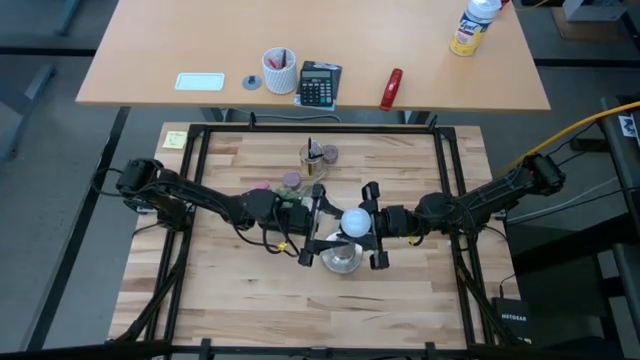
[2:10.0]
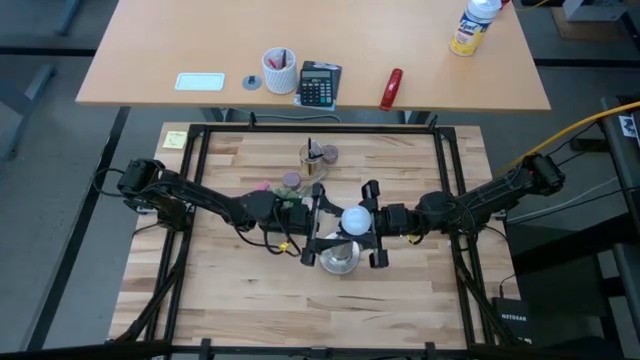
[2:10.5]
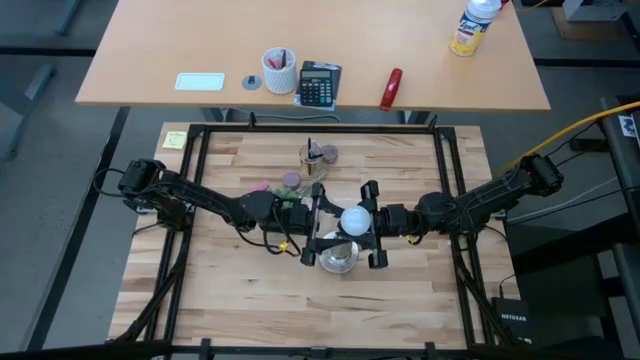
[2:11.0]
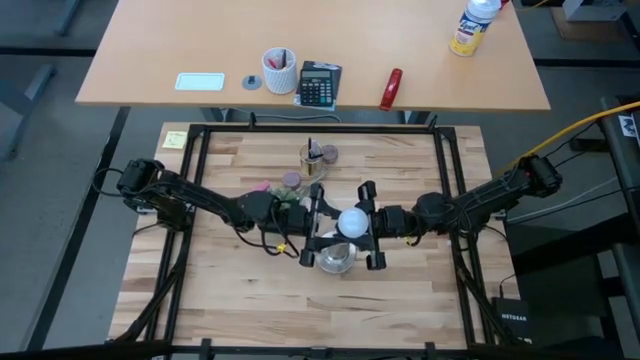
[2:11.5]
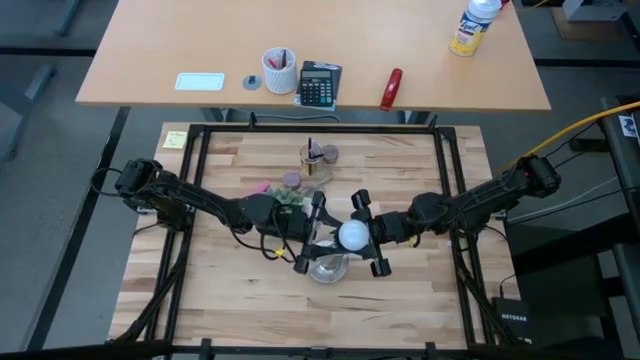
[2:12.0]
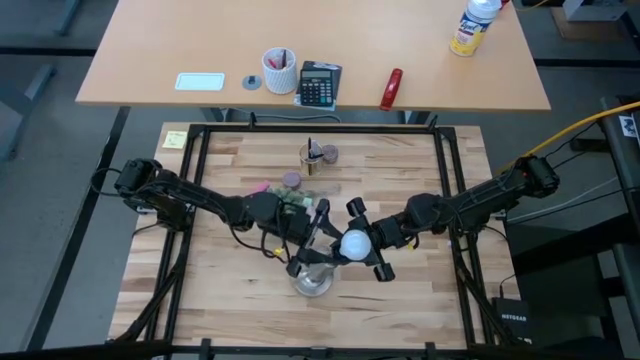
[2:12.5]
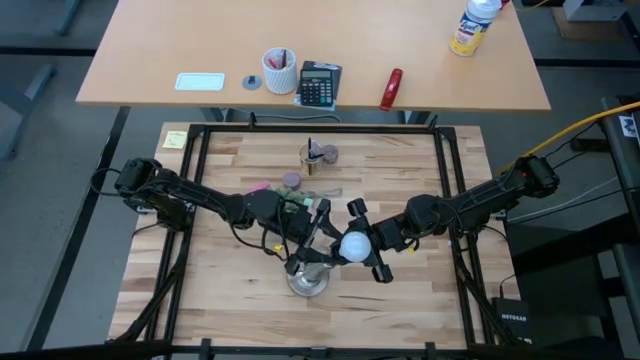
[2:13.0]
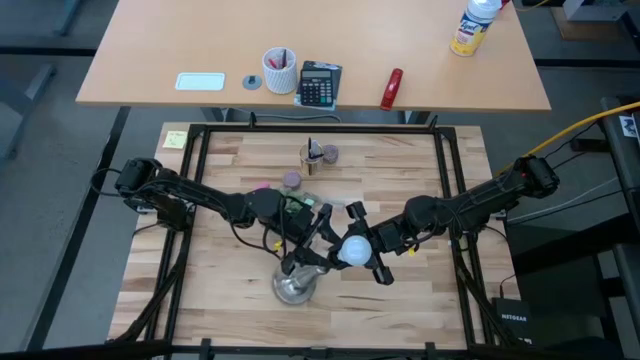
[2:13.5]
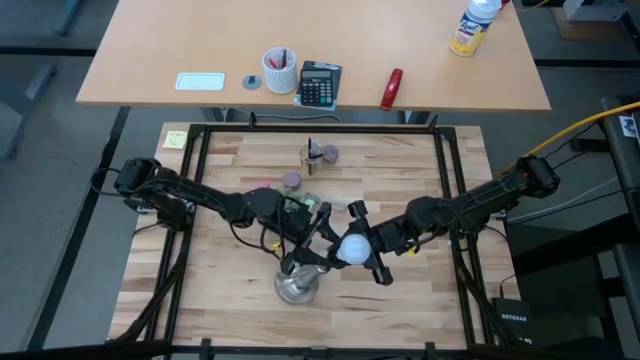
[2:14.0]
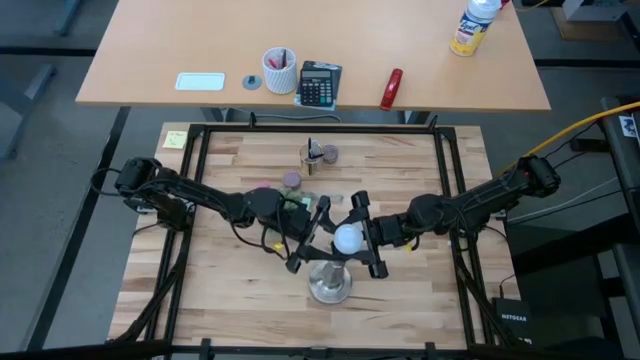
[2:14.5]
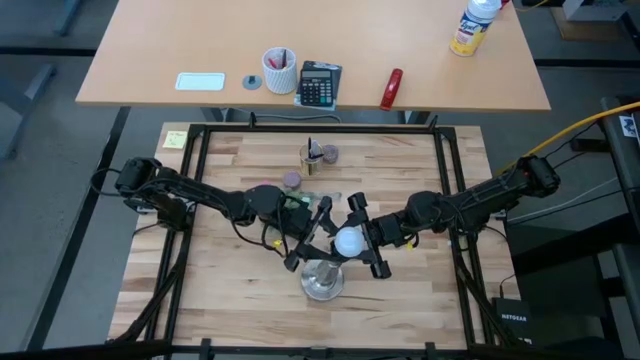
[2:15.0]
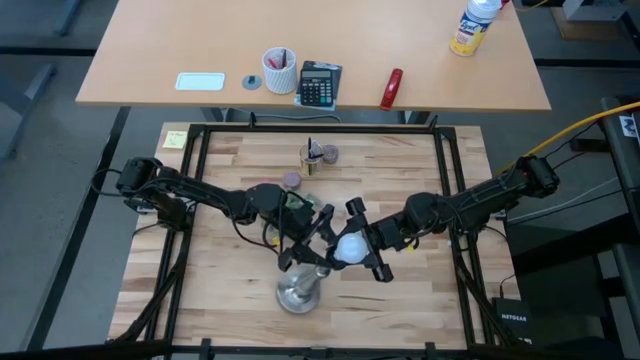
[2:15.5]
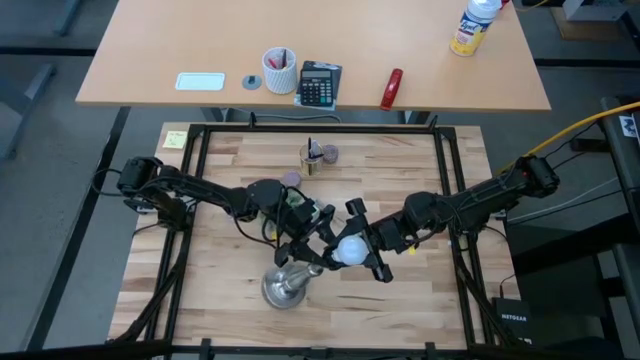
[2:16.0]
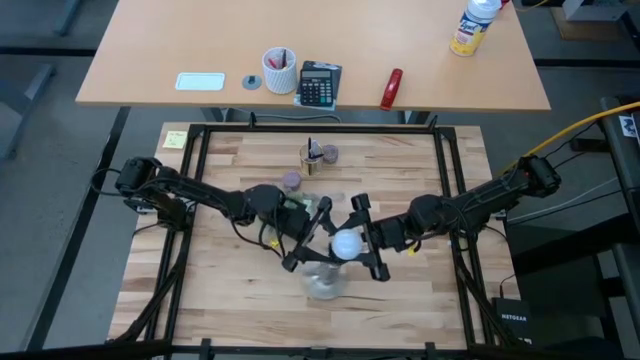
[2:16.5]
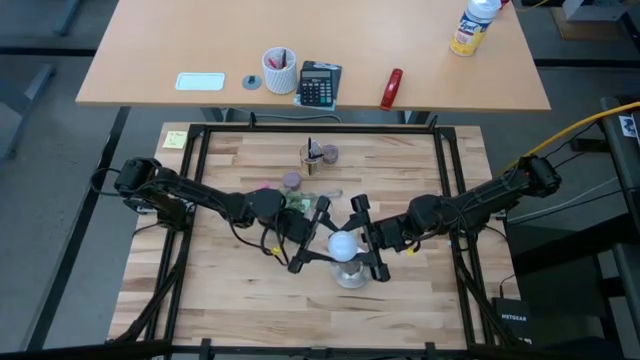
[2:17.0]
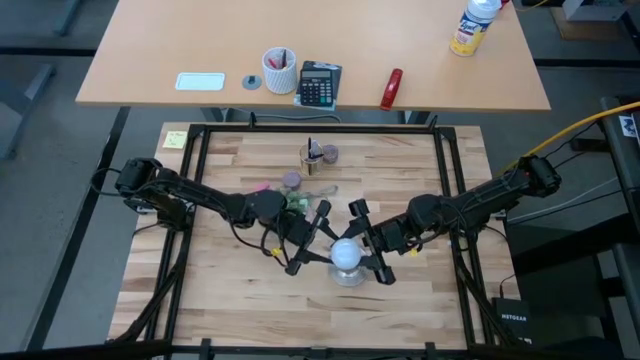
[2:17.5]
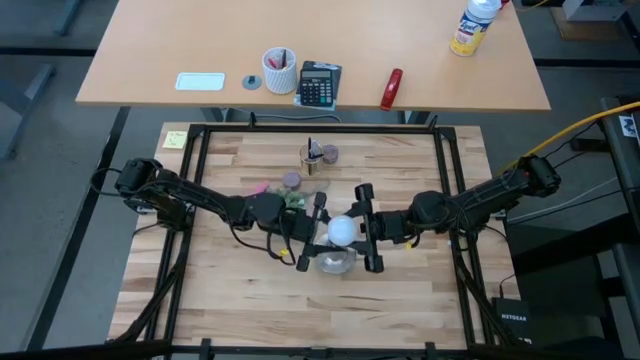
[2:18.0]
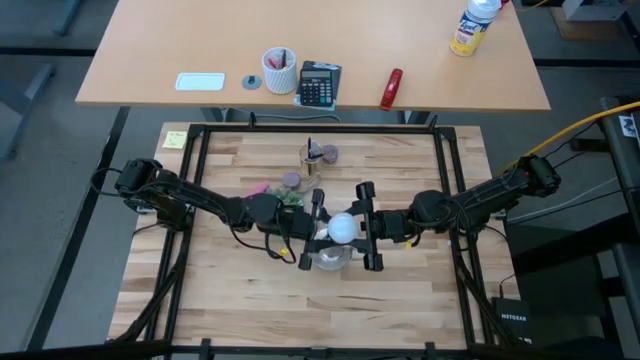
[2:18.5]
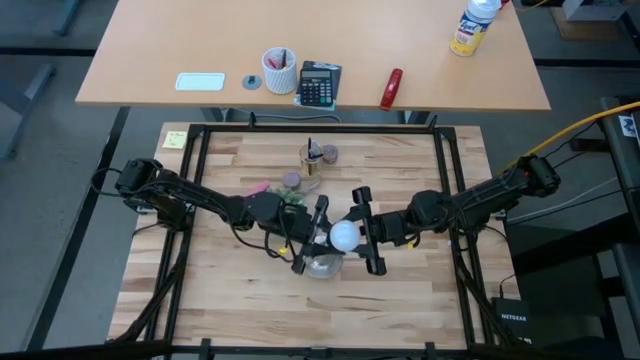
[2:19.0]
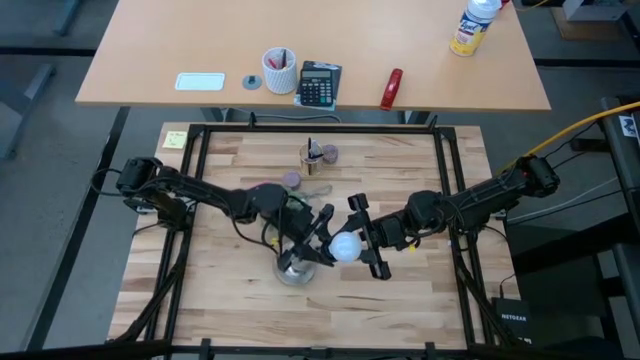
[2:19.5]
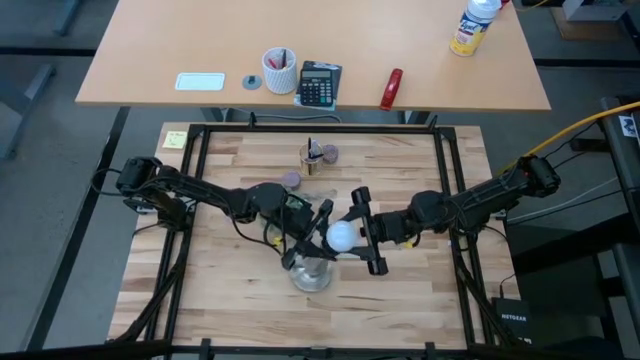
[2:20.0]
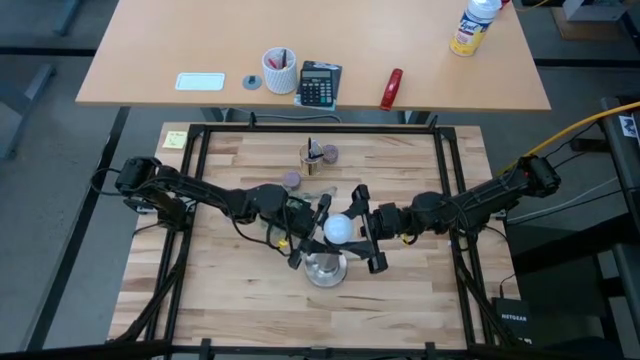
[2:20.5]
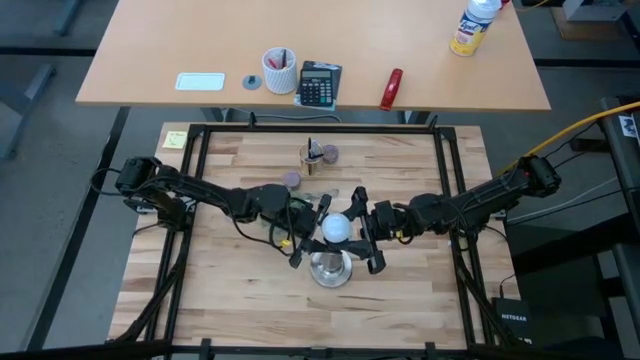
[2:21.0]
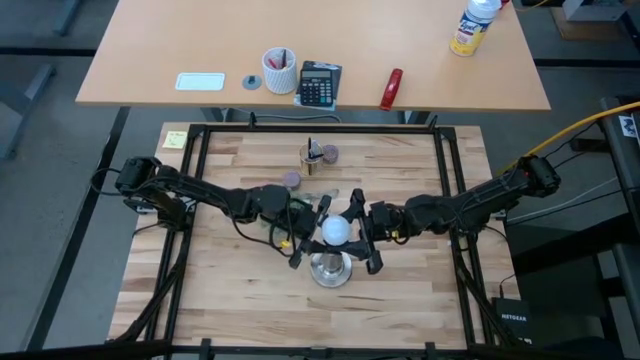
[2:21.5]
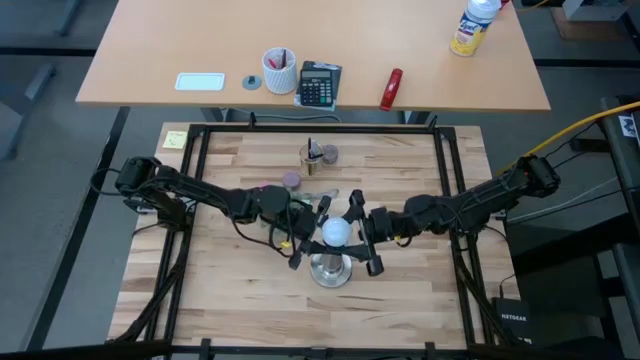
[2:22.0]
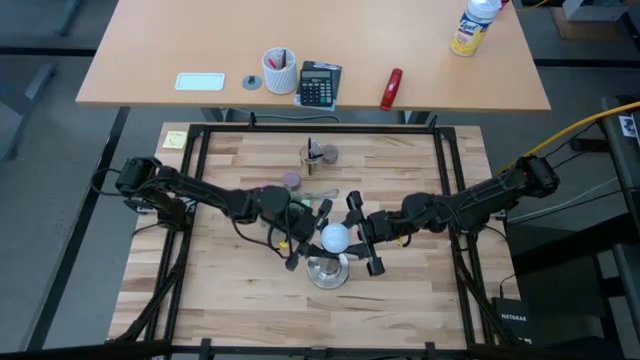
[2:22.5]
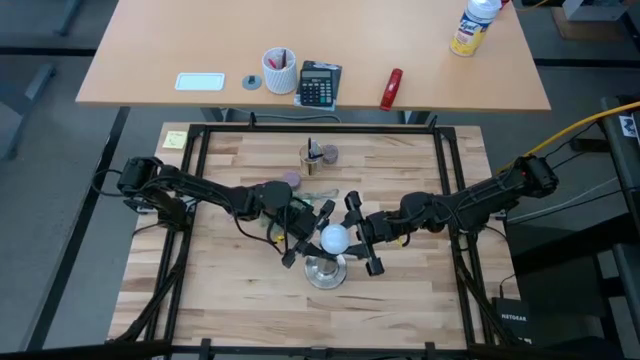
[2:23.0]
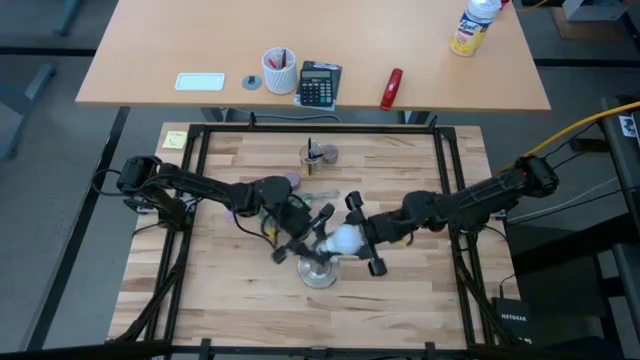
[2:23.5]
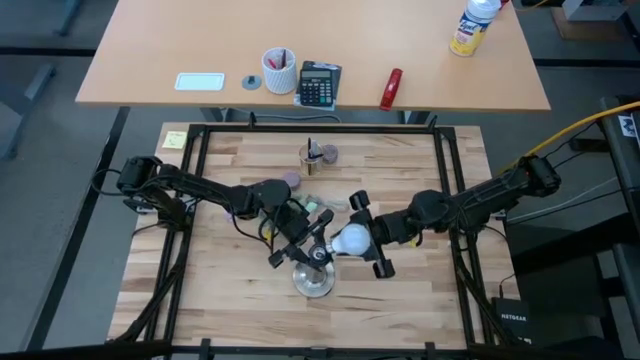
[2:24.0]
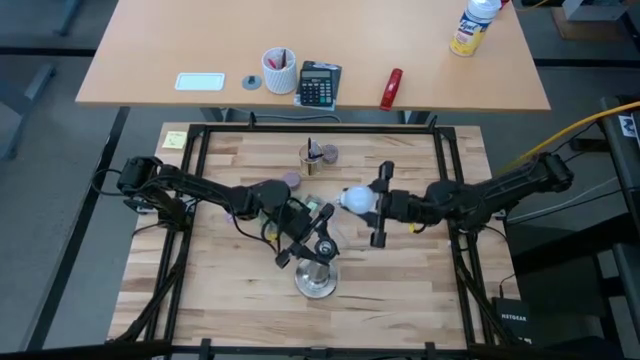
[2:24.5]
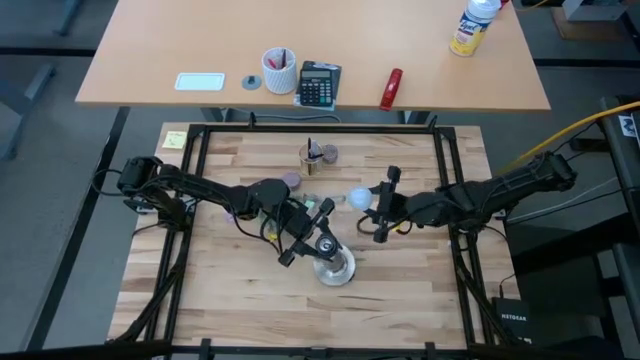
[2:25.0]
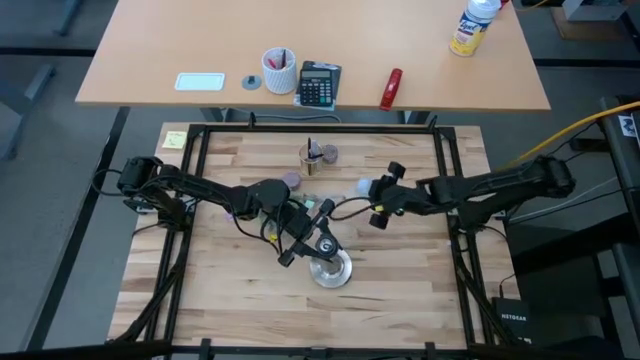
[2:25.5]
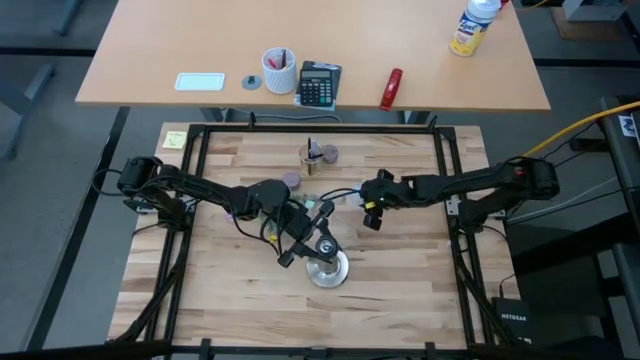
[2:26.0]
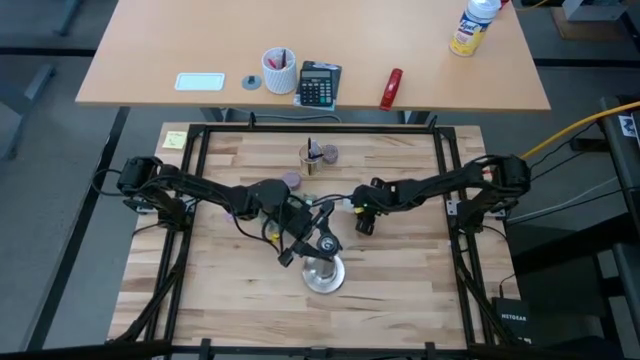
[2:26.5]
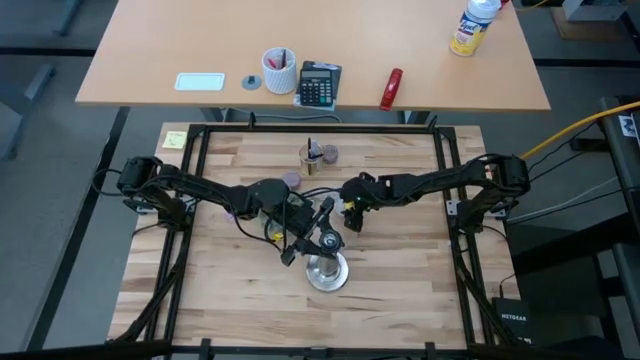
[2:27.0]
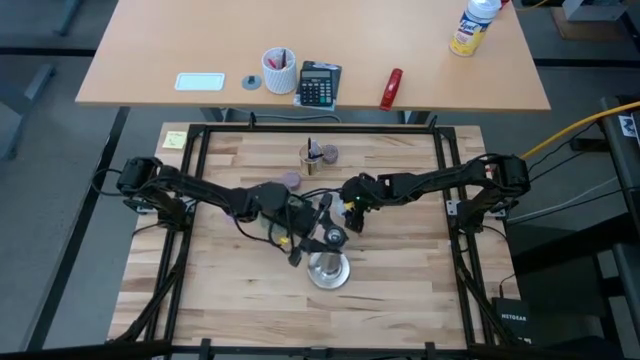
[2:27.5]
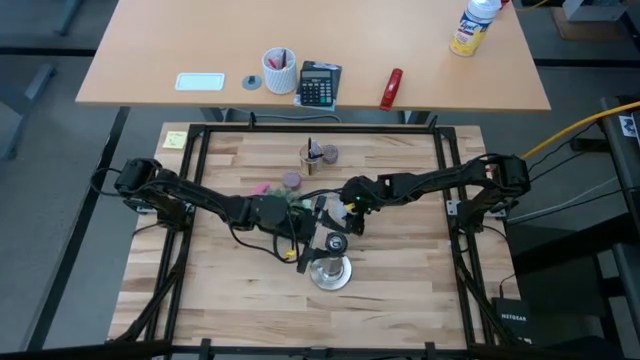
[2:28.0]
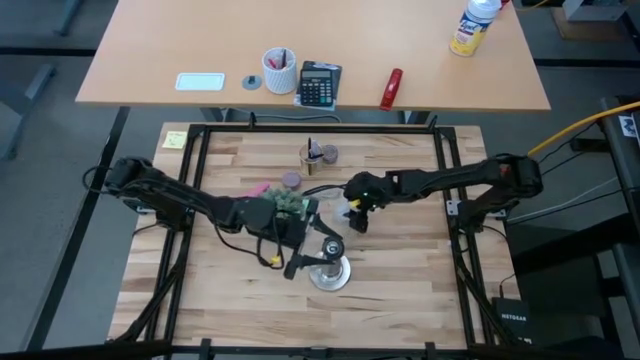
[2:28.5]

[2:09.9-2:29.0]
Task: Screw lightbulb
Remove the lightbulb from the lamp

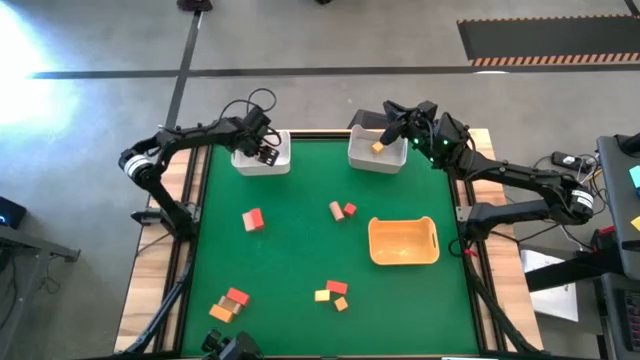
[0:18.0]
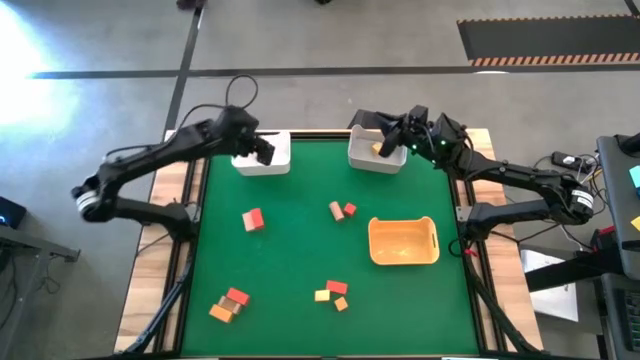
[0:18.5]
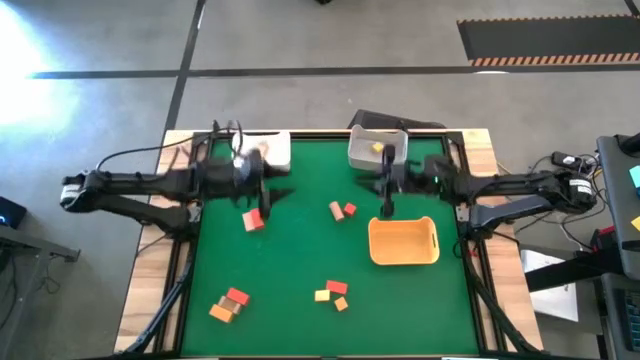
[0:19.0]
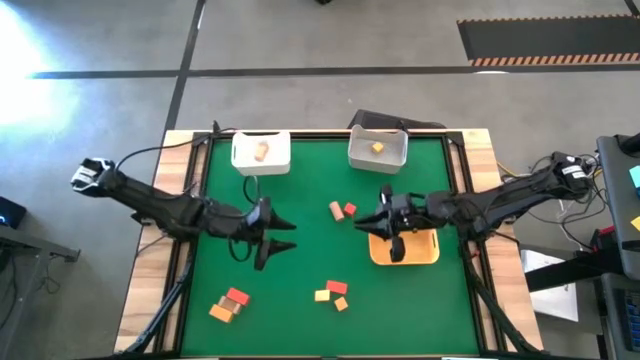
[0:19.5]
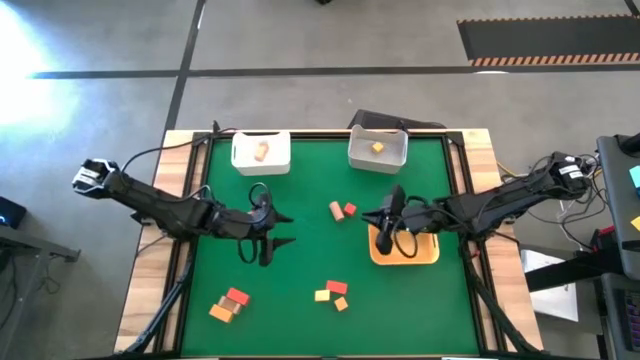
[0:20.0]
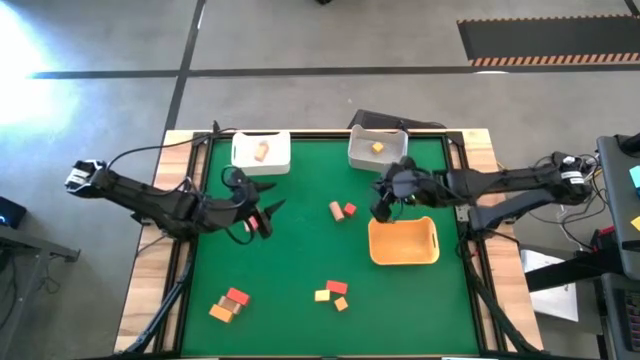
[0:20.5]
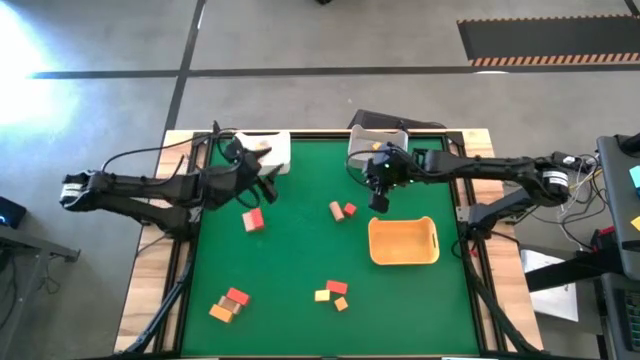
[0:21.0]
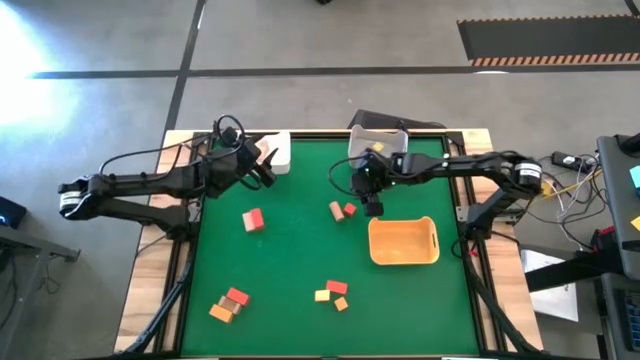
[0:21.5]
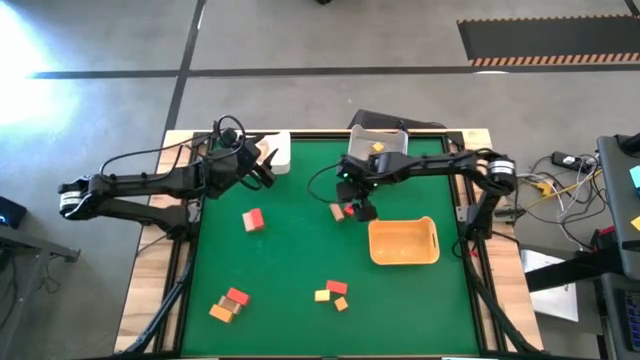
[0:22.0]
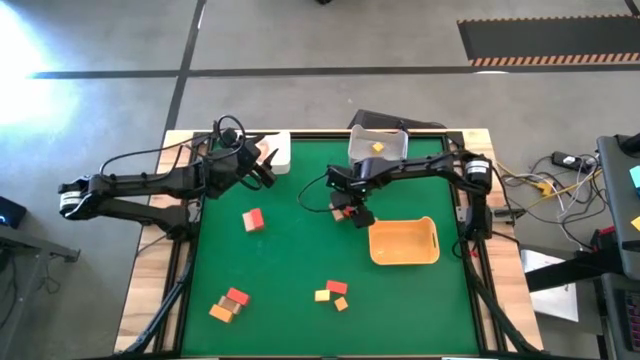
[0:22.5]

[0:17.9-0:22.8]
Task: Sort & place blocks by color
Put the orange block into the yellow bin
